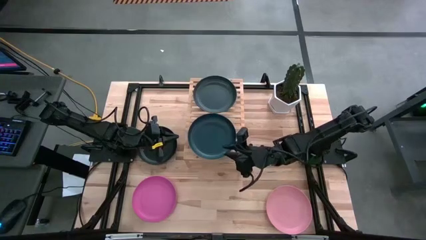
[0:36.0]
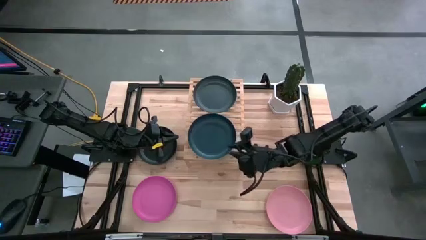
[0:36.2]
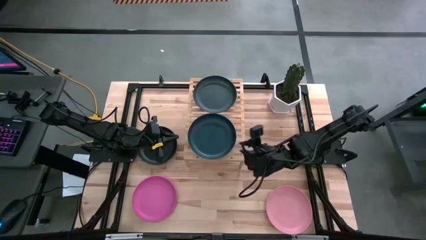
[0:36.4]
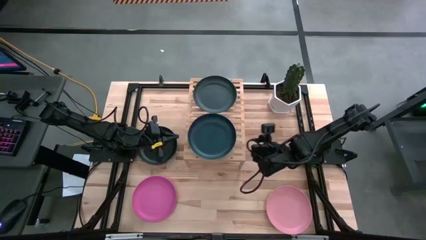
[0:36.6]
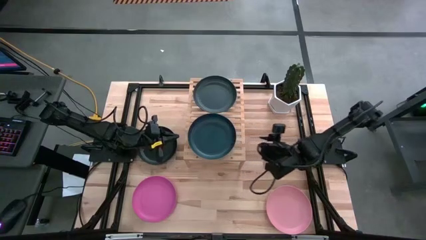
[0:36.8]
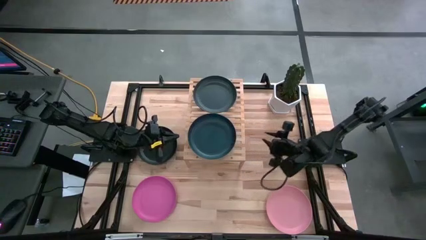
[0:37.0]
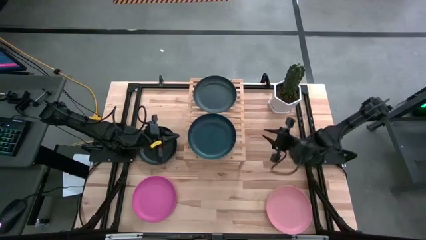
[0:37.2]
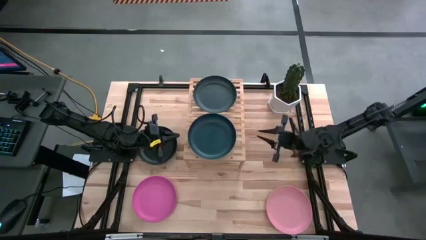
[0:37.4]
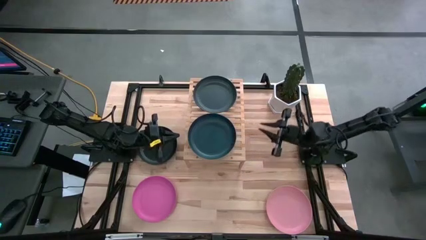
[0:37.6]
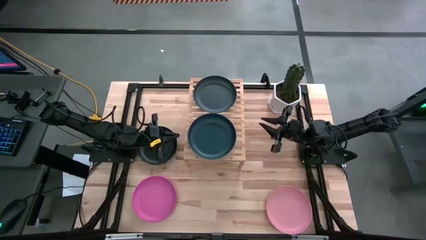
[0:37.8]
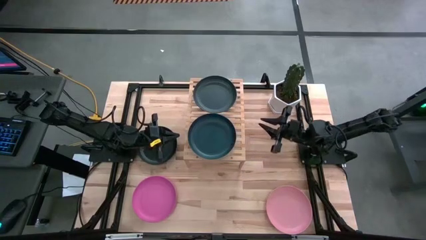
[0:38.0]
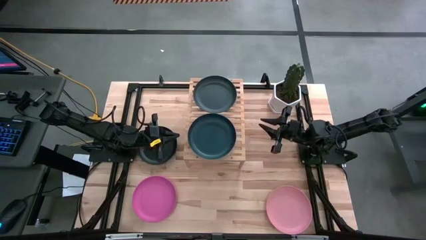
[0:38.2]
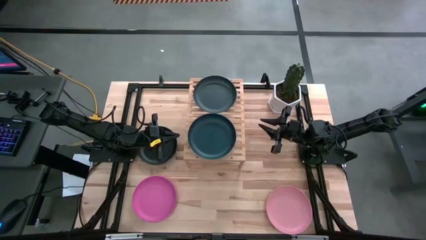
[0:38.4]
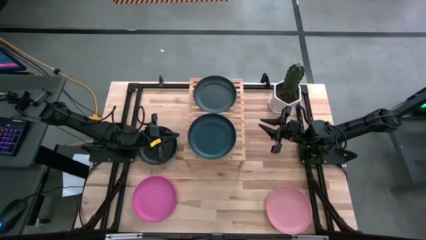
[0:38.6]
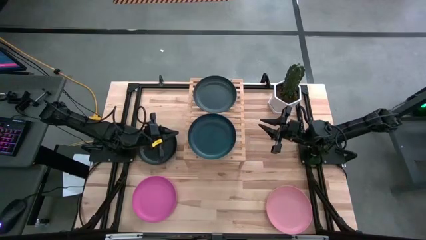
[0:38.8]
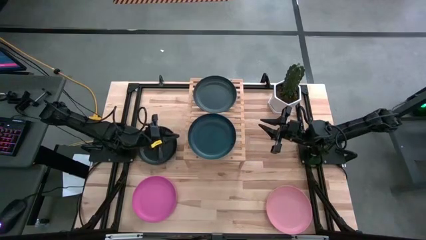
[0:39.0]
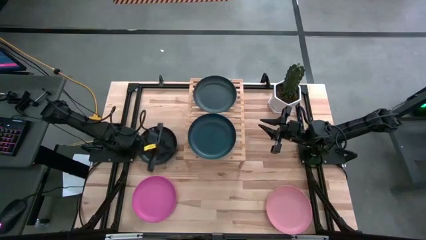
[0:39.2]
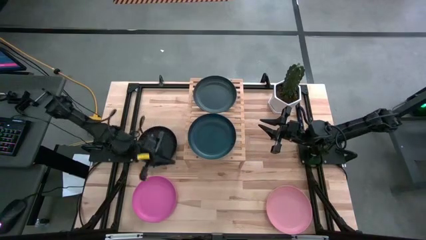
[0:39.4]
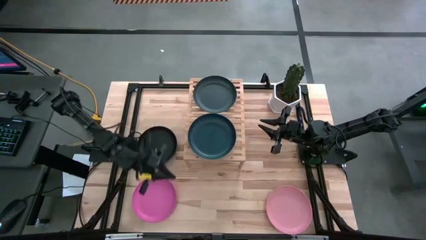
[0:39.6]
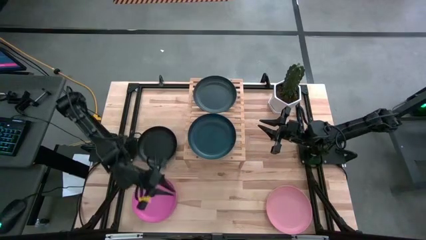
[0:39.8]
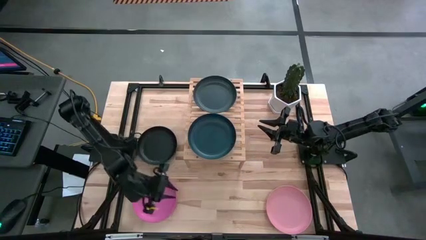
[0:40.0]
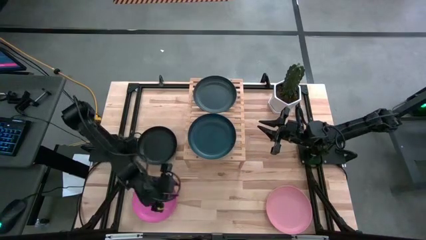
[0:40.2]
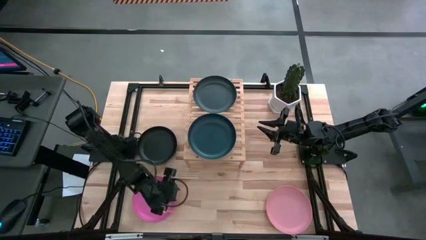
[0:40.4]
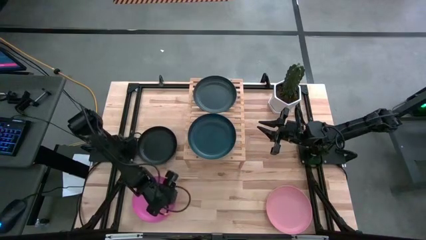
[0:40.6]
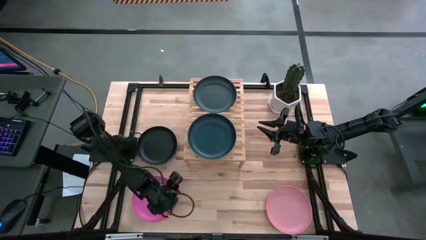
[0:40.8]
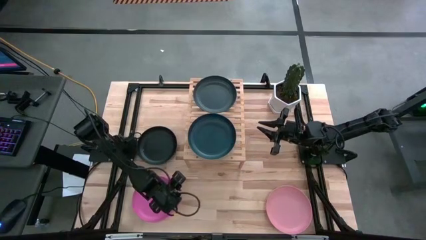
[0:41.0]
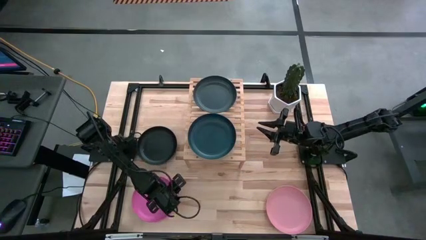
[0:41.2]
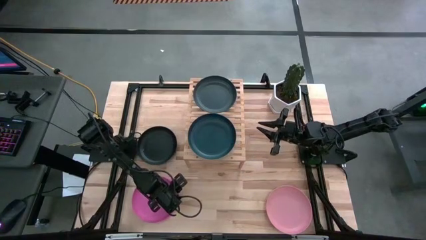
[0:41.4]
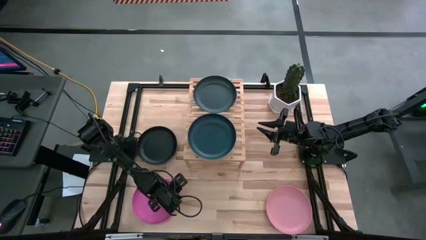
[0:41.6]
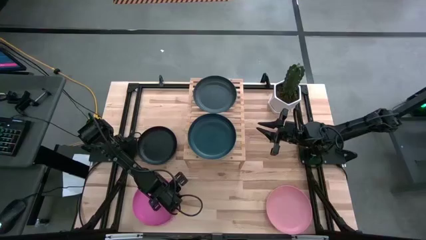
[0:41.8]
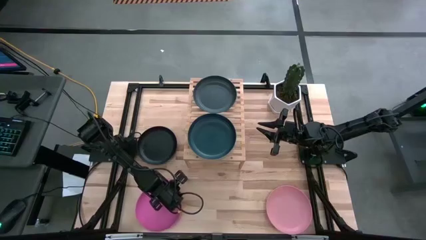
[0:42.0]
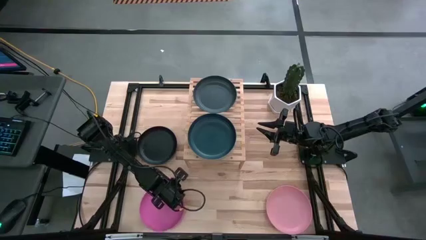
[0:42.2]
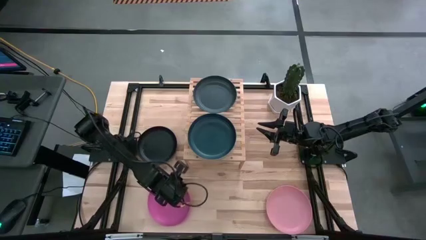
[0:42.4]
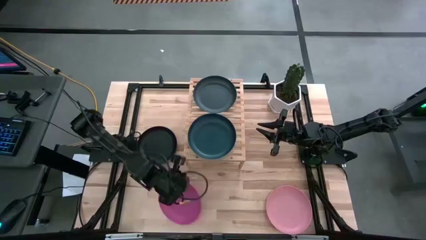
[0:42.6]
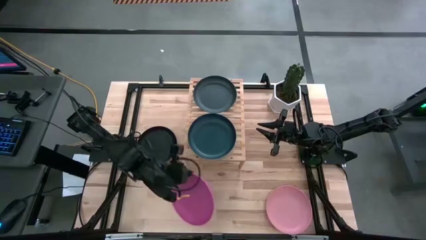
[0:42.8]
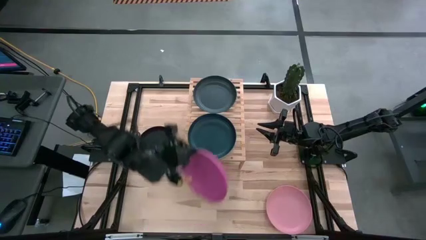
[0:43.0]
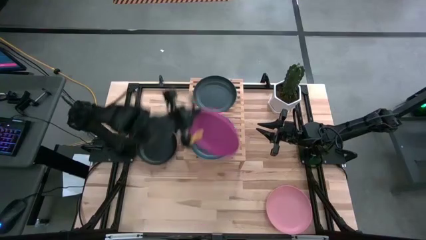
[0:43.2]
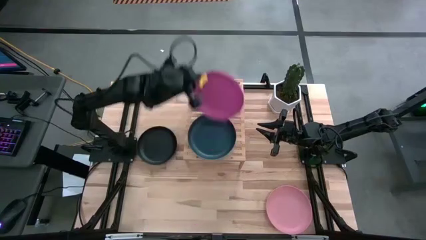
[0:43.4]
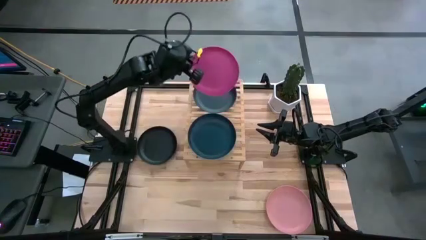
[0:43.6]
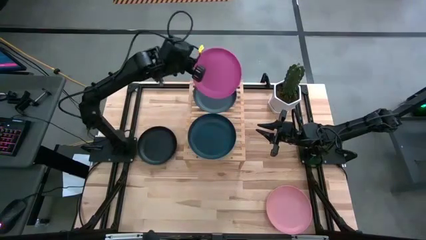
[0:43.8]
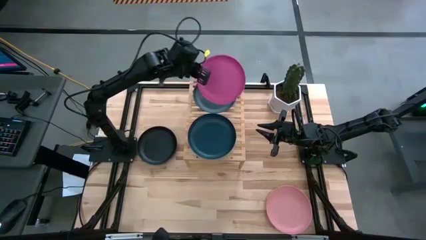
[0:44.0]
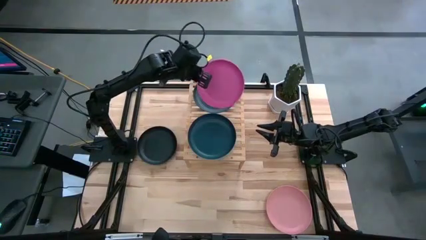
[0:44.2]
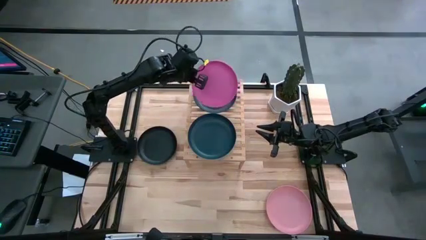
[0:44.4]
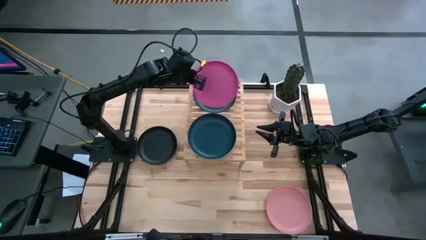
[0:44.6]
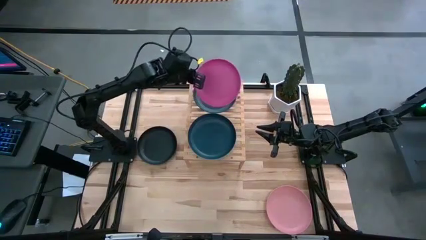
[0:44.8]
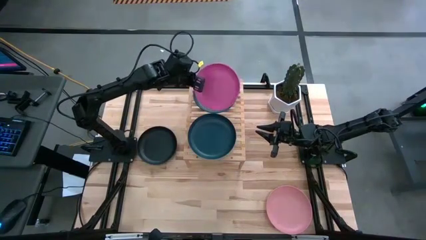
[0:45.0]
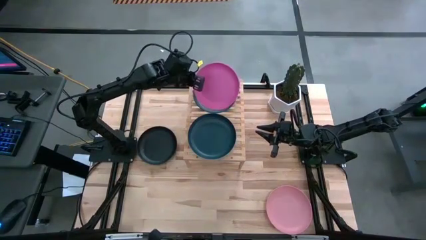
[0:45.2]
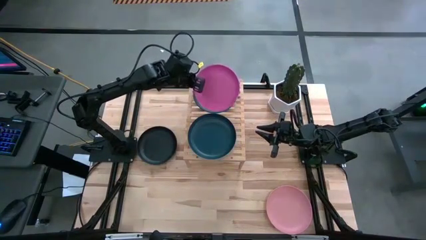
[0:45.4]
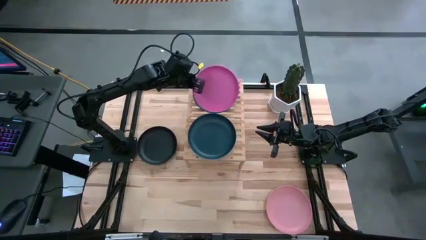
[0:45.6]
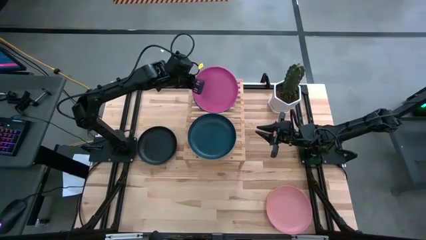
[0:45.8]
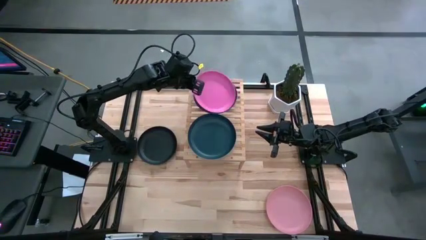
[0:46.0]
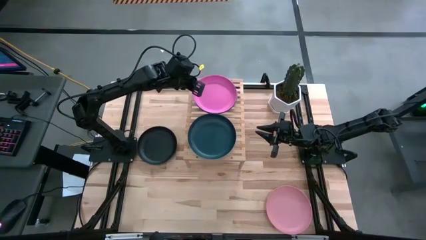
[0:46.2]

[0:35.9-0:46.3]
Task: Place and stack plates onto a shelf
Stack the pink plate on top of the black plate on the shelf

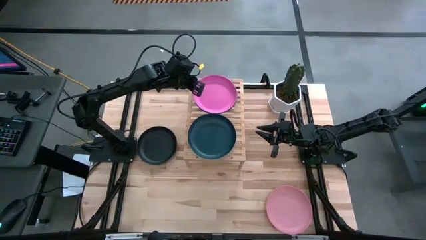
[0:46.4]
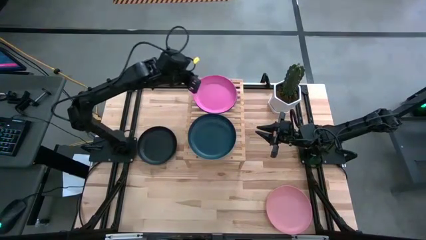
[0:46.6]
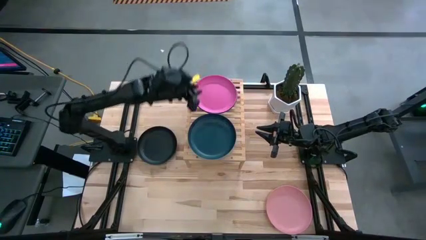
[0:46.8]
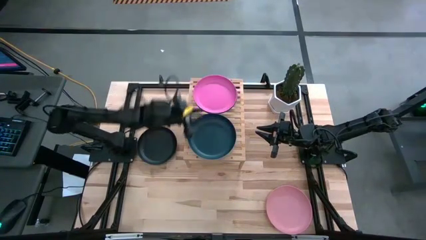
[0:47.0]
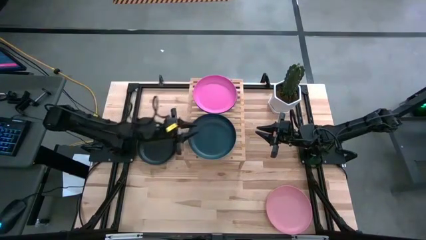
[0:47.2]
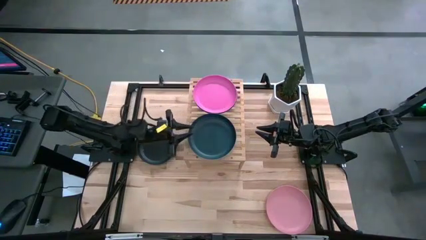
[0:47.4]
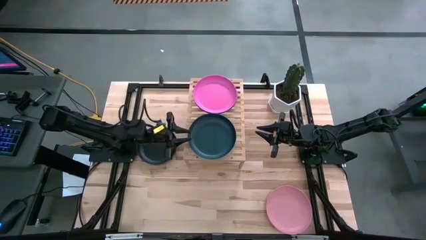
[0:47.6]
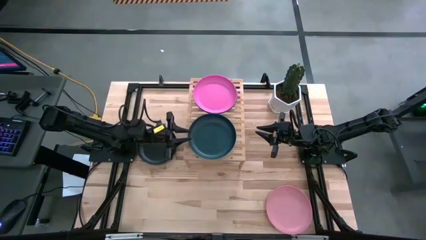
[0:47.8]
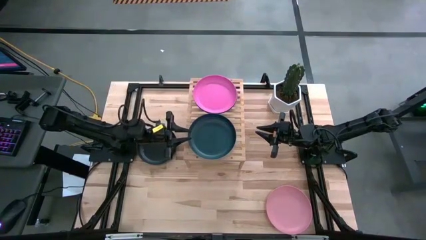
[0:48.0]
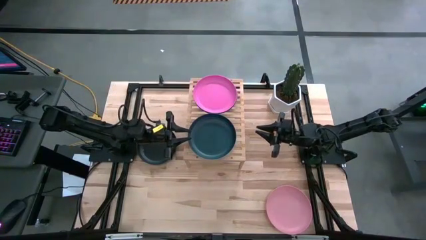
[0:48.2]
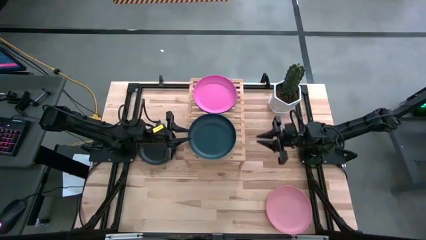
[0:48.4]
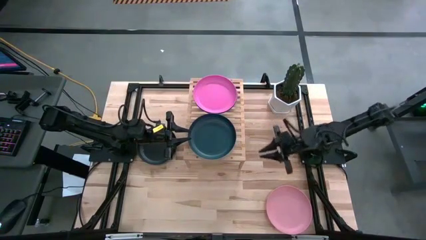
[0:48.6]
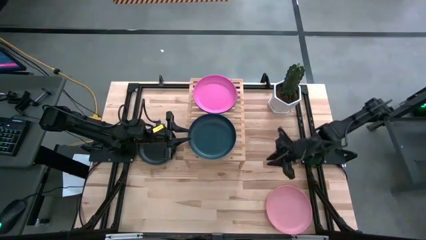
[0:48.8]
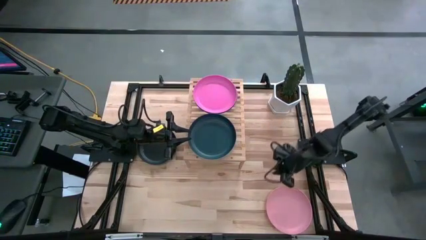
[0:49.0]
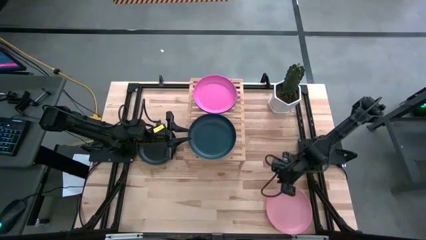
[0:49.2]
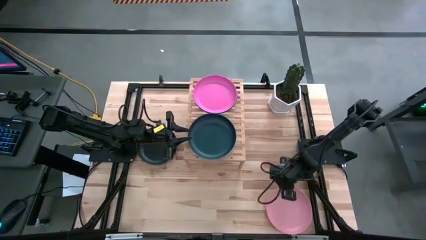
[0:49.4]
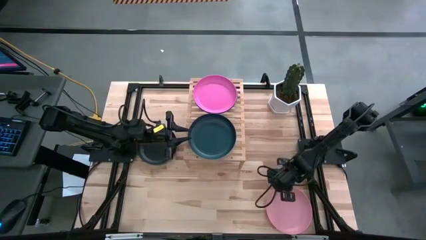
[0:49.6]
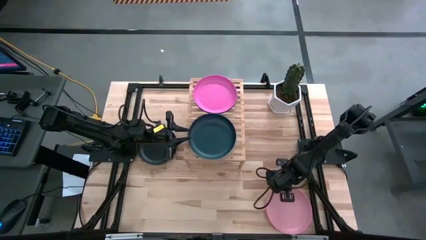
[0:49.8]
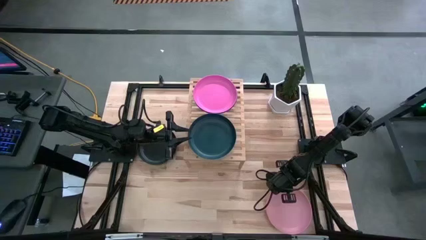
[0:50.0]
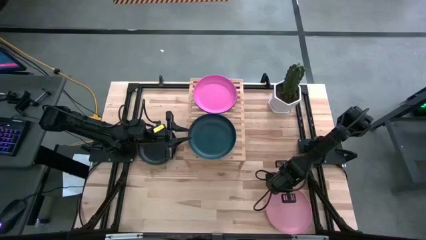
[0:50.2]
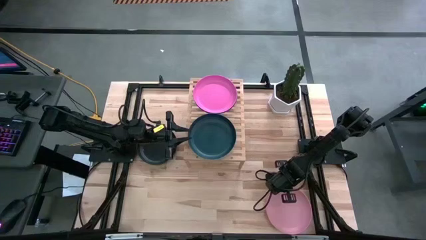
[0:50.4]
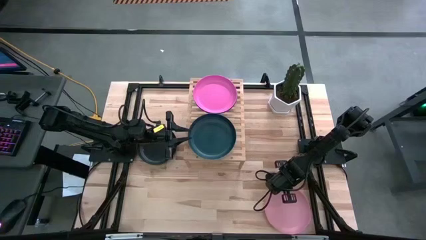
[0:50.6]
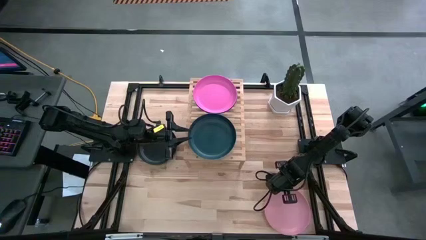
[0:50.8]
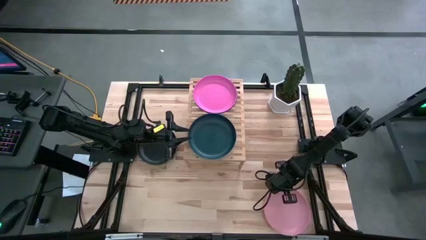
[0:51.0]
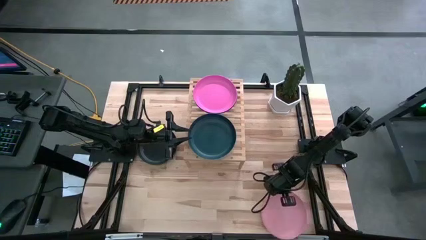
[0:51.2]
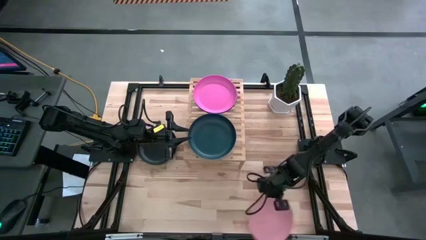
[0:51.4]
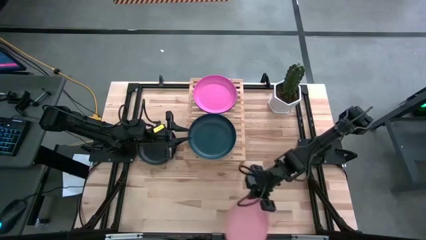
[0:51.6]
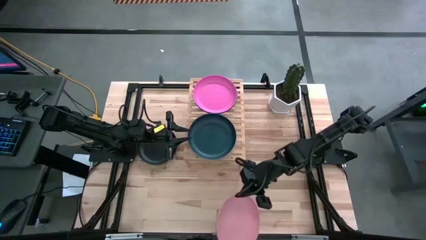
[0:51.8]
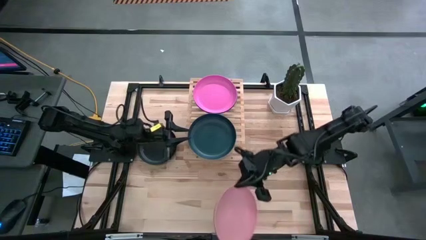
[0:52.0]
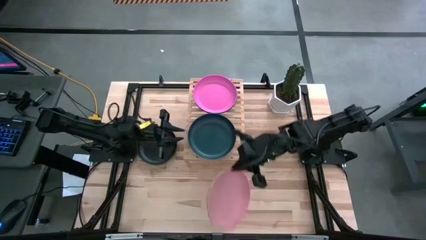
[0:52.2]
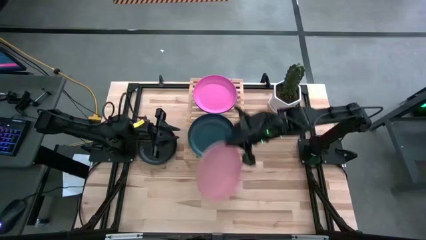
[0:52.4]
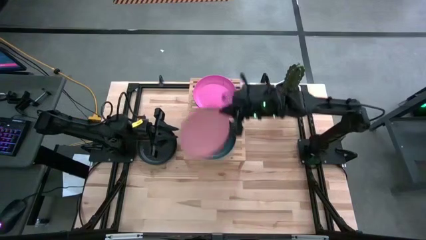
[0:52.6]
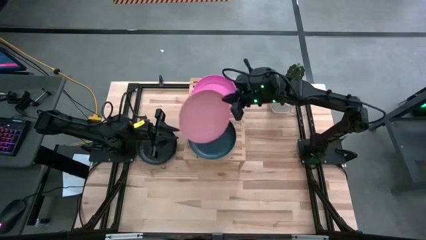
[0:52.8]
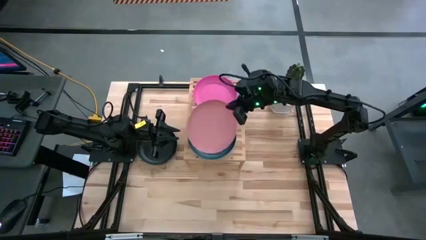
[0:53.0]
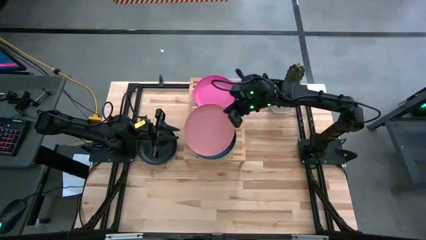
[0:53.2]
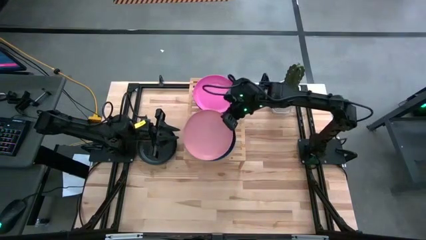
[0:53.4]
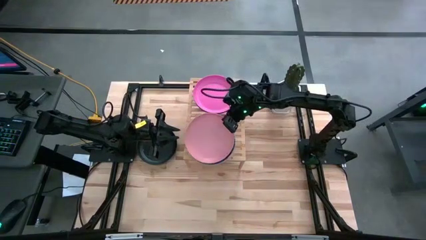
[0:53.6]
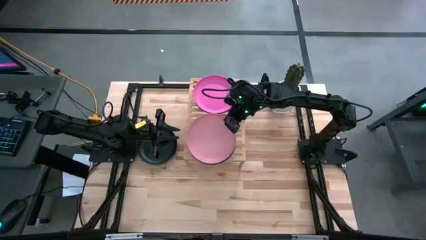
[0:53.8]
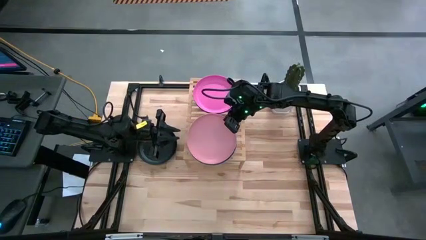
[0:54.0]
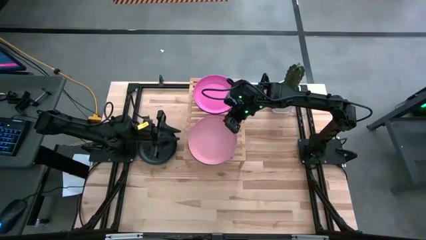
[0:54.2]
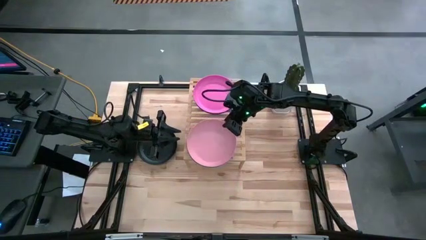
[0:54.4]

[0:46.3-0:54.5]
Stack the light pink plate on top of the dark blue plate on the shelf
